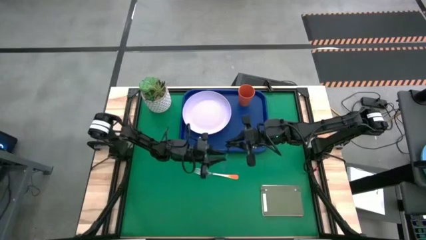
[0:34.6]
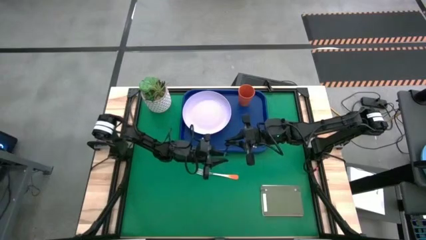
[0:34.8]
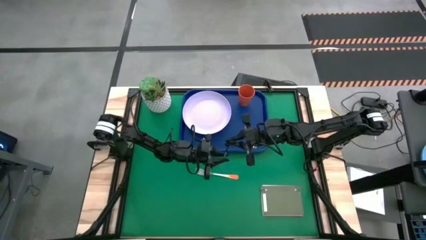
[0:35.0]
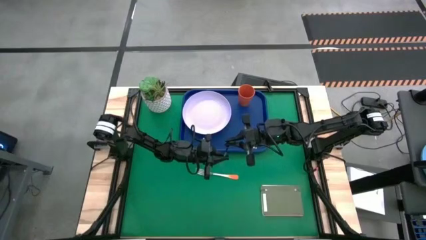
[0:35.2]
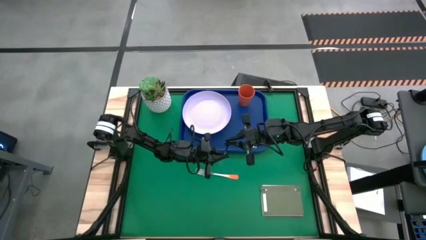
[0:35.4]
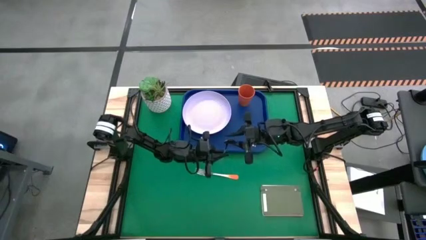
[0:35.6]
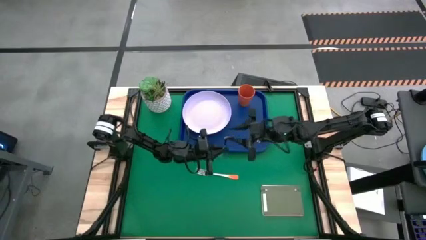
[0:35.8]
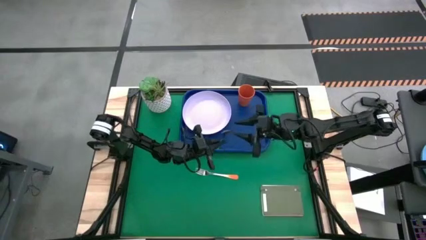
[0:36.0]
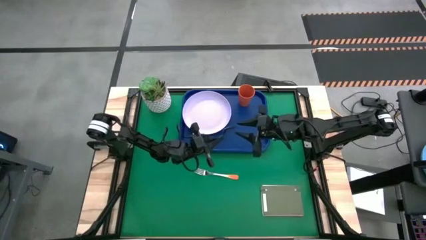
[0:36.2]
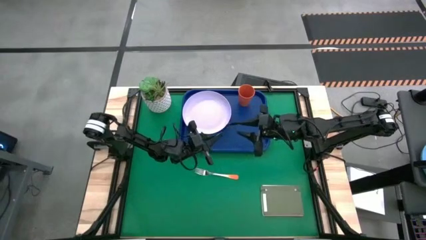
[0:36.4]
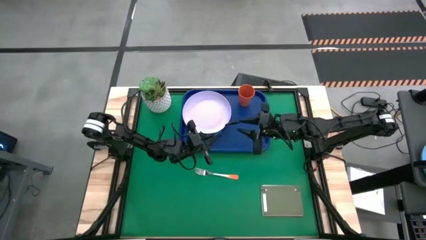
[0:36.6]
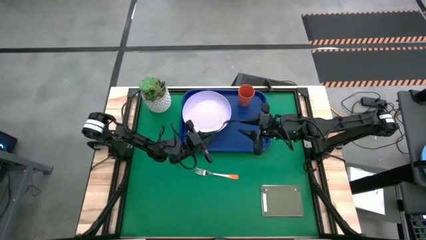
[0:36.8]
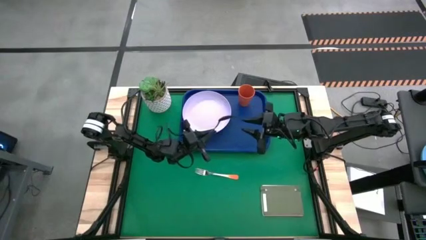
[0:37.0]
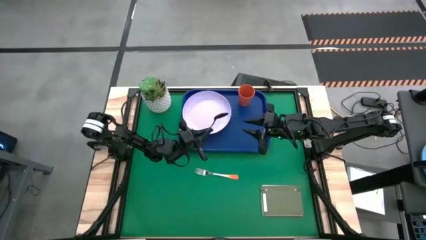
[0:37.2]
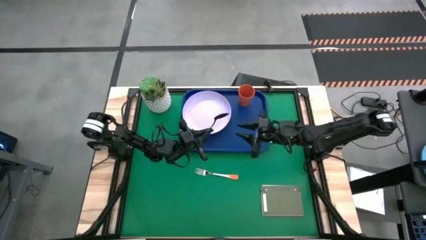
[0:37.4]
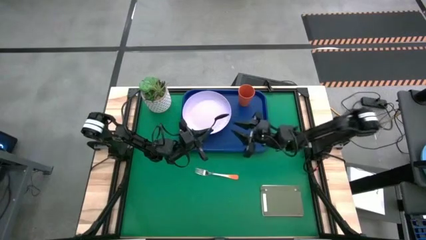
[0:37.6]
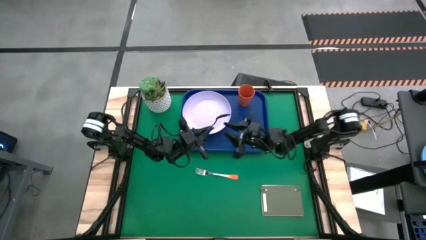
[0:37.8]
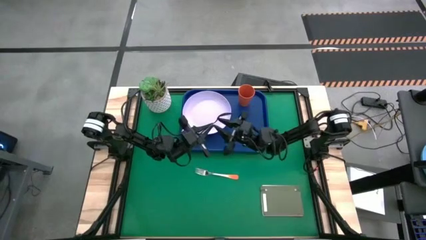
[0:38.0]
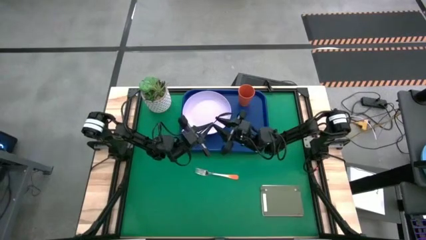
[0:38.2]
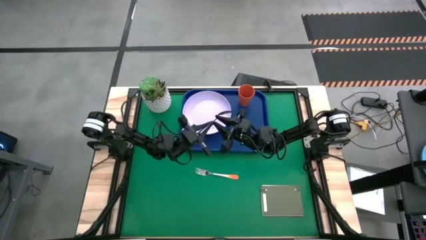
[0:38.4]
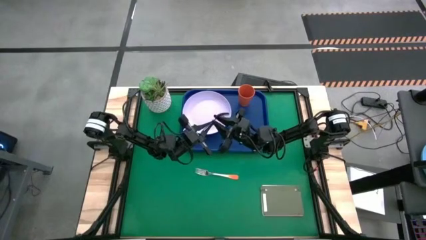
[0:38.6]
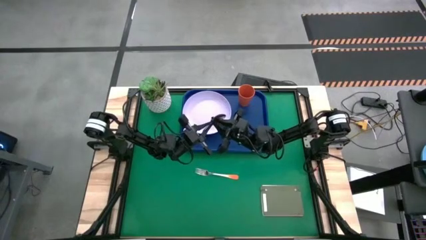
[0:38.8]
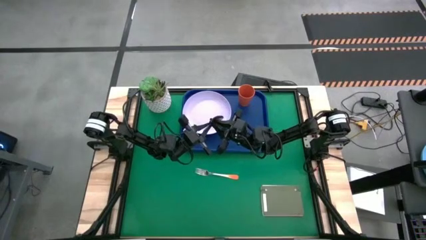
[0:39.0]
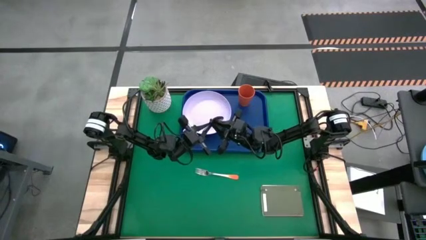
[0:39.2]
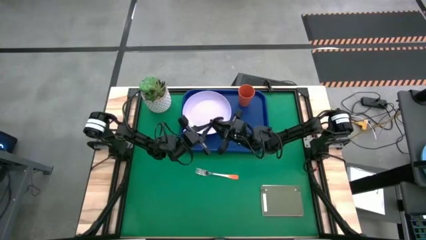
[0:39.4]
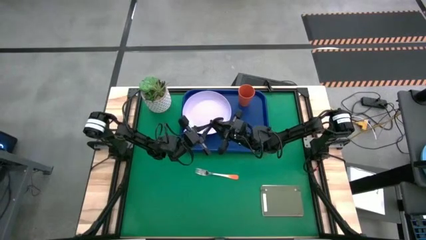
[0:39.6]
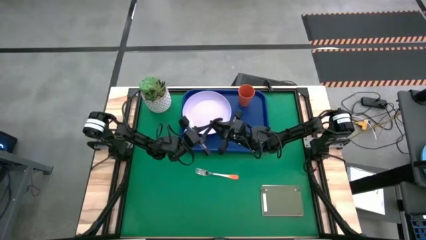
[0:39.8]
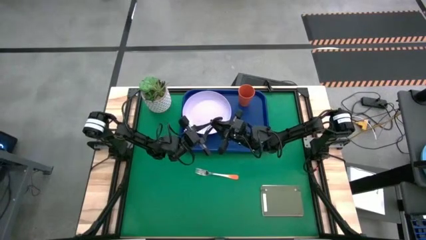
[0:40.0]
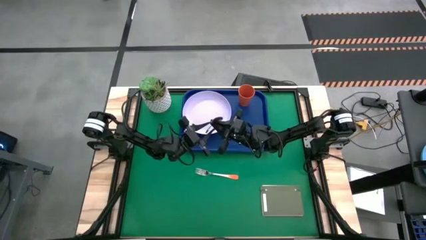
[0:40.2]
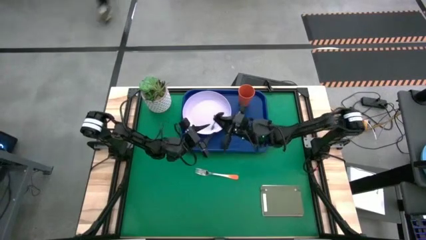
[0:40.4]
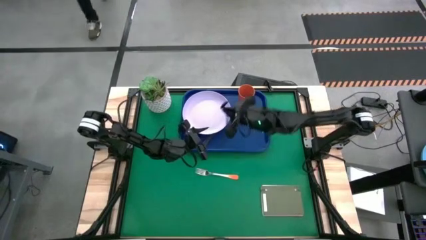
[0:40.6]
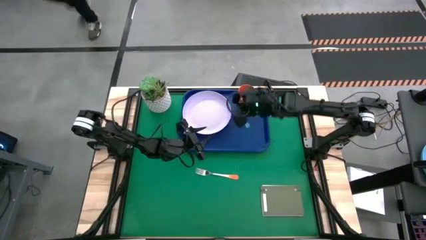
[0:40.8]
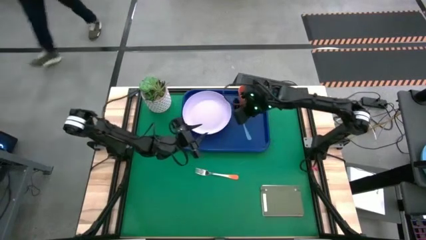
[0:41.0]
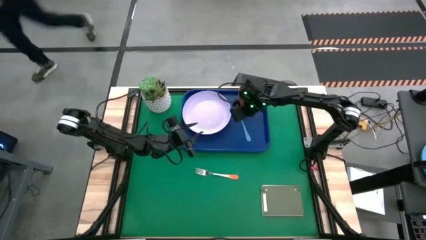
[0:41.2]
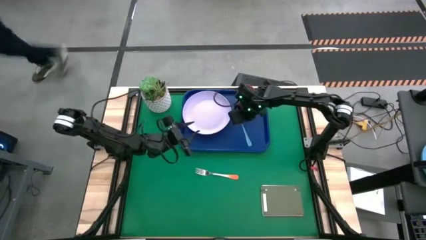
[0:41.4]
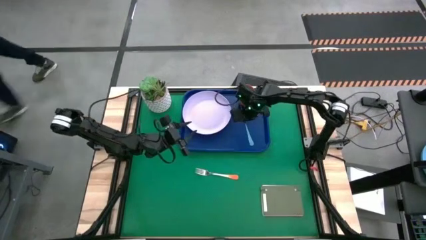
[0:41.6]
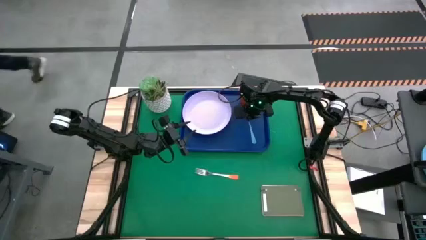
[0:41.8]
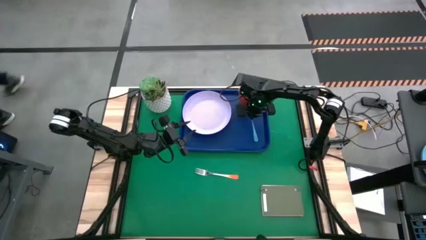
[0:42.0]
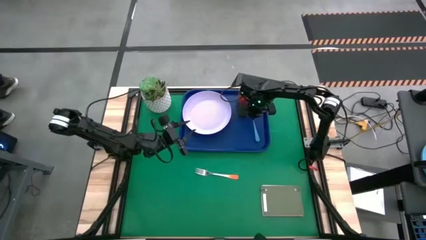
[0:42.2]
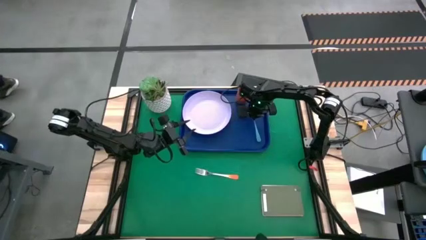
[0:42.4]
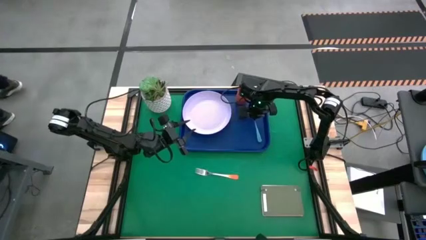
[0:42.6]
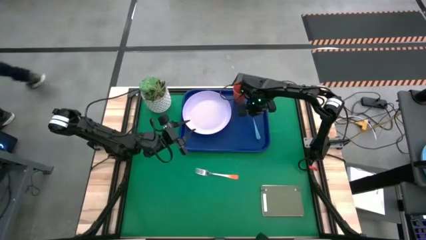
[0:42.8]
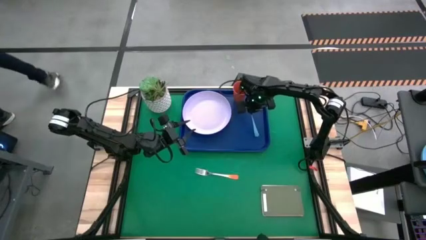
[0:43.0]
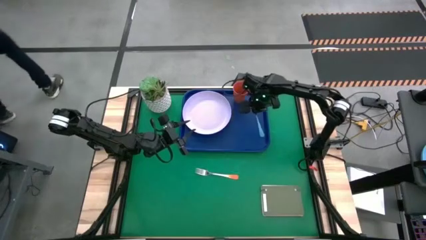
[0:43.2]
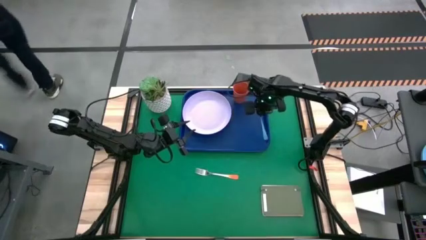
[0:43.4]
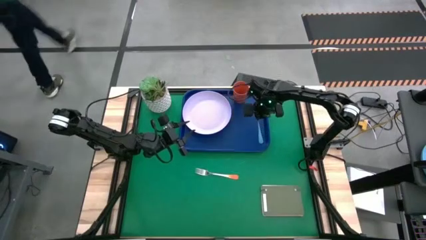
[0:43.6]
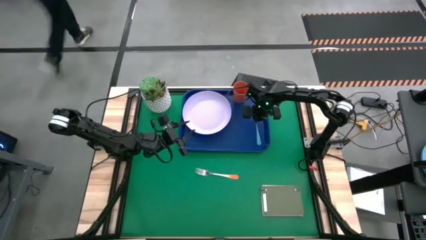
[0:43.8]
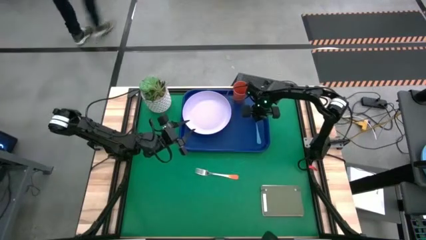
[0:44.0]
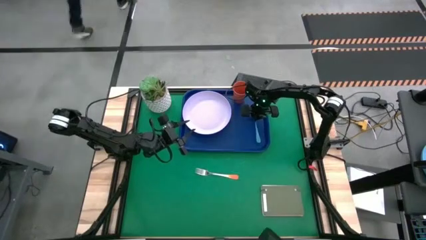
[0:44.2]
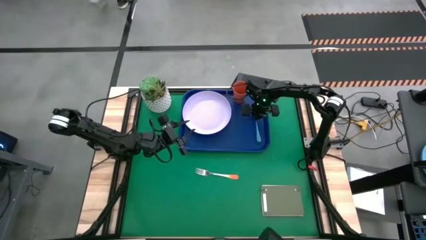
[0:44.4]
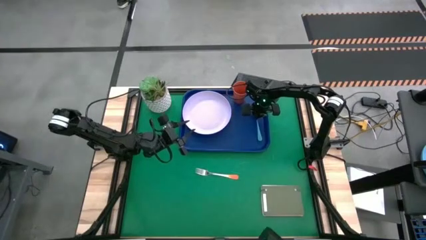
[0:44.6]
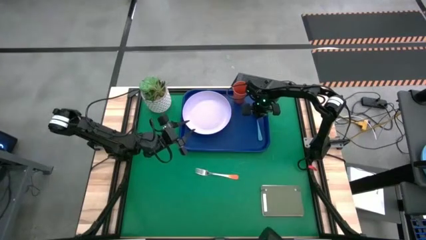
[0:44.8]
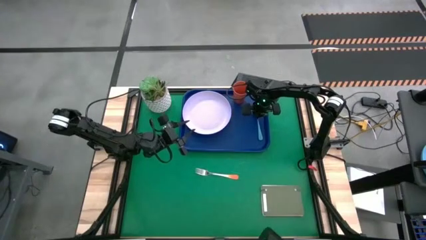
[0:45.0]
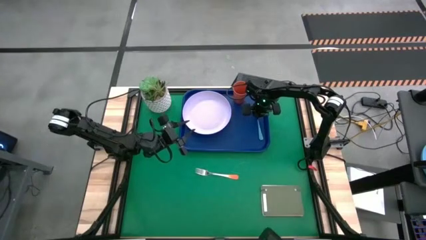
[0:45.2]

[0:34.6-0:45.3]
Task: Pick and place plate/cup/fork/spoon on tray
Put the blue spoon on the right side of the blue serving tray

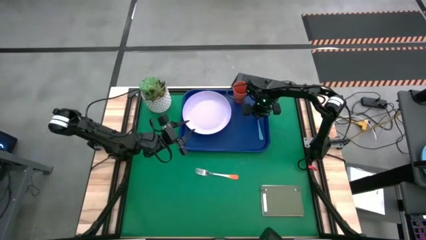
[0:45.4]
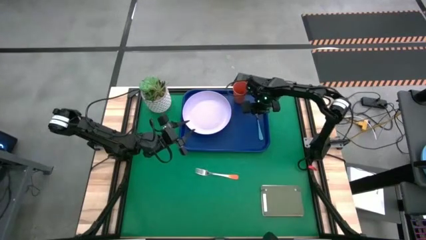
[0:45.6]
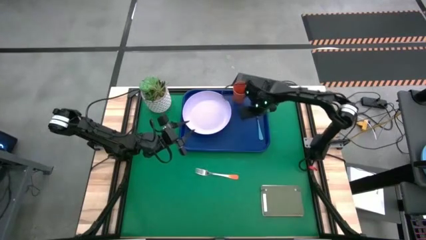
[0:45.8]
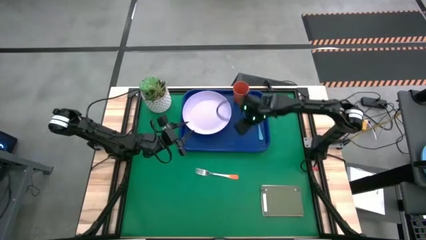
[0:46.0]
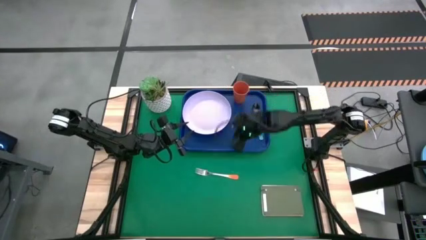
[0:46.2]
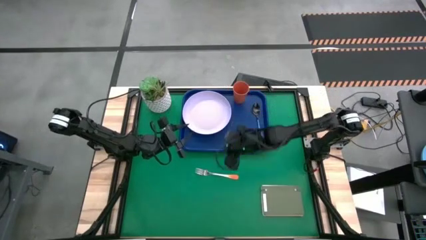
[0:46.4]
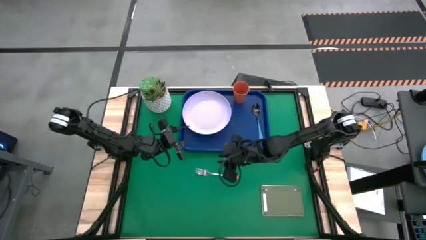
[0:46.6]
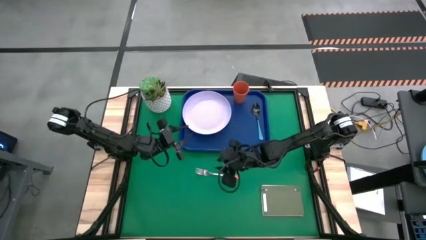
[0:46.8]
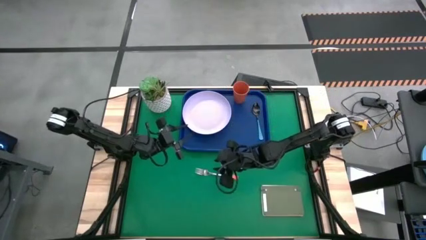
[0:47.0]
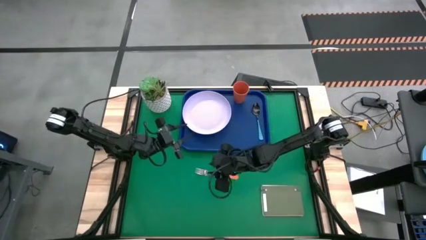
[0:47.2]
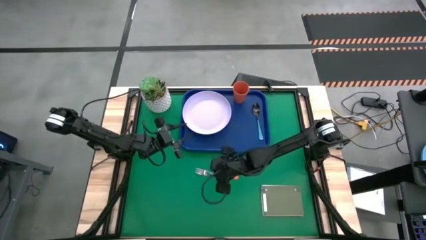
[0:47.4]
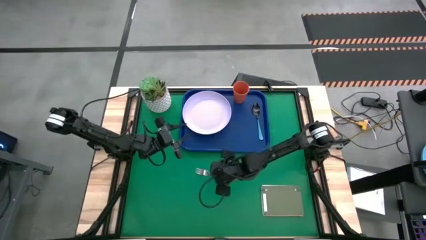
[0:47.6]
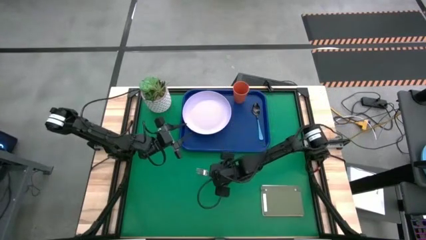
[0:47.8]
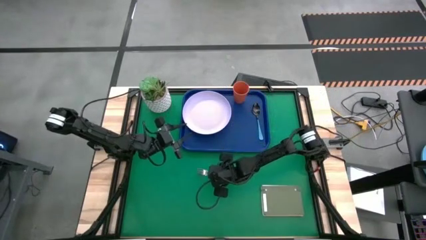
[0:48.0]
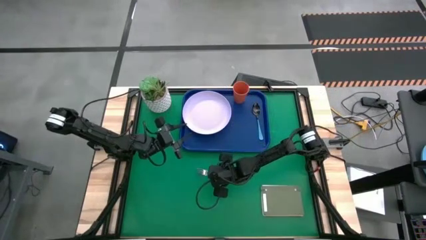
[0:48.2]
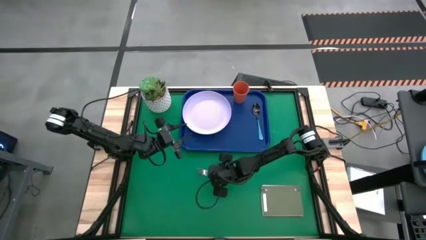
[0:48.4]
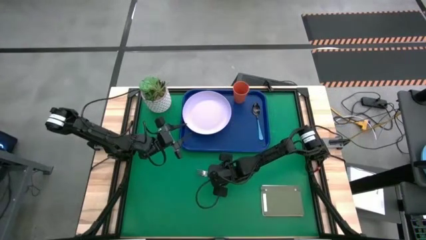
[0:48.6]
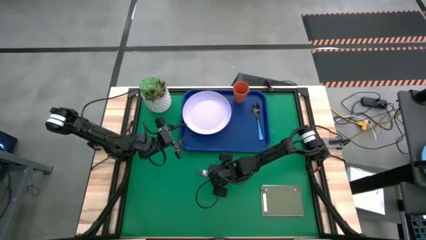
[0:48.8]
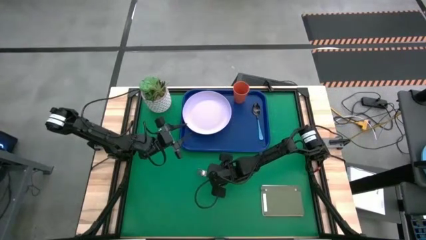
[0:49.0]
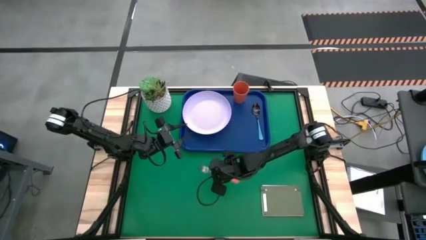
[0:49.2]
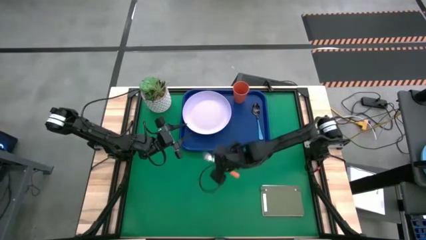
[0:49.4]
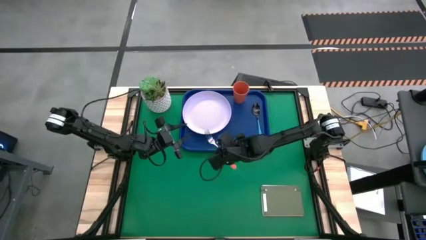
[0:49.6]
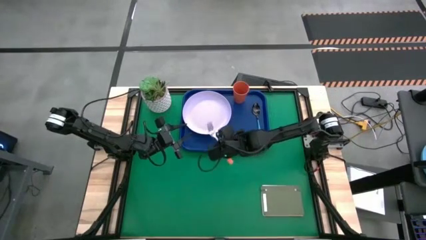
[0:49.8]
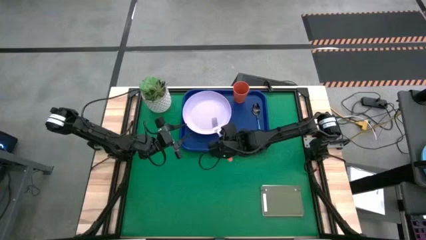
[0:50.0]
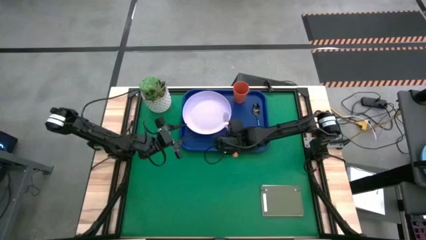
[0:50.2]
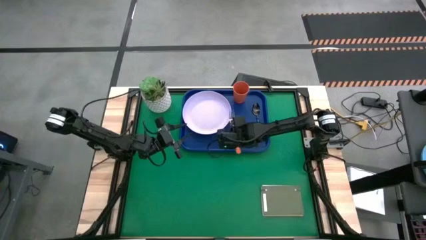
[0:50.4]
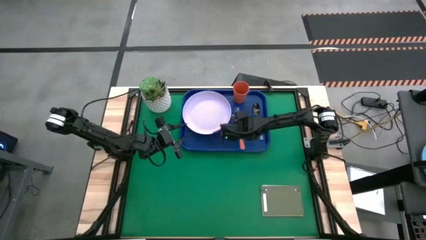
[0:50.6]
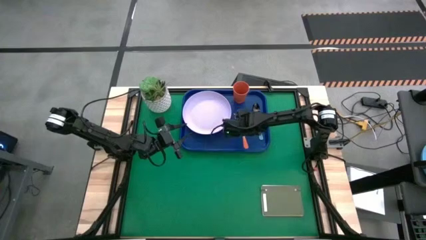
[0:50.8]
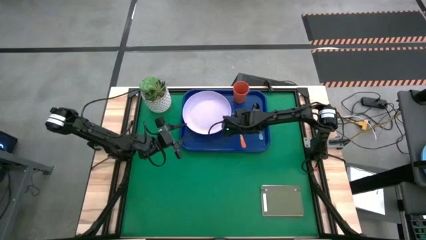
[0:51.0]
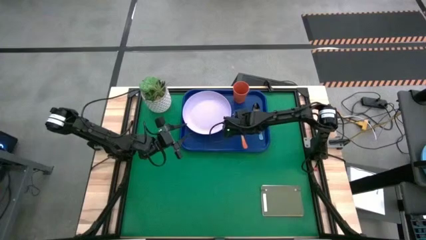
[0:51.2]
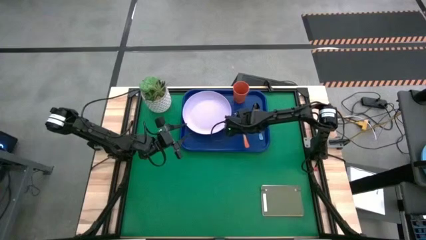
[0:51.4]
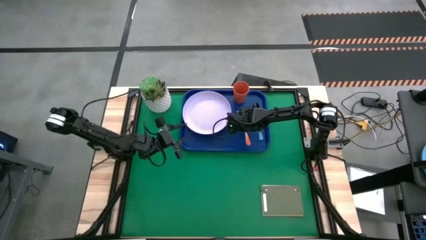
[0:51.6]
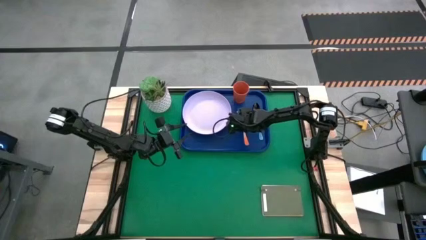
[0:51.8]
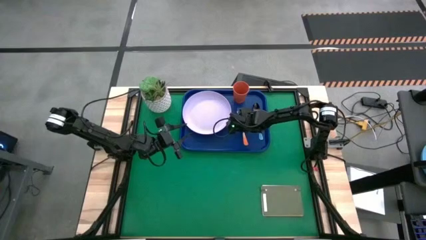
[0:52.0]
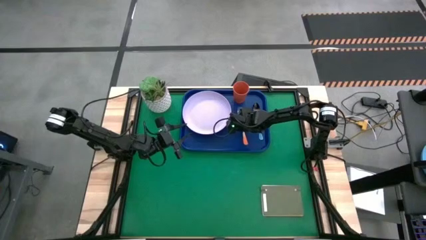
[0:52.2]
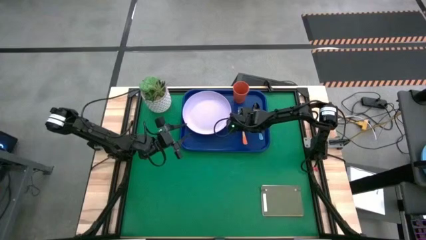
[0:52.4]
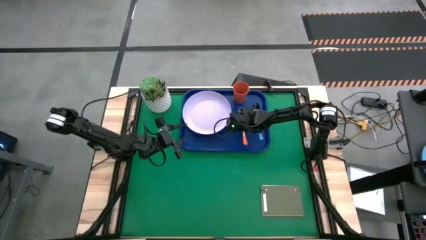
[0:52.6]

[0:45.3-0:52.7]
Put the orange fork beside the blue spoon
